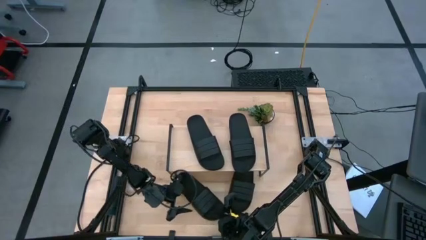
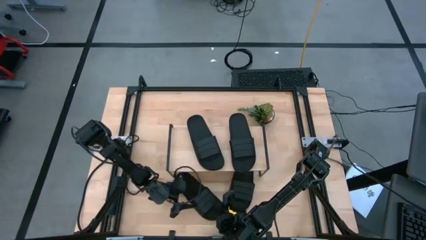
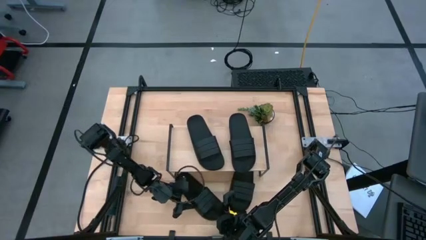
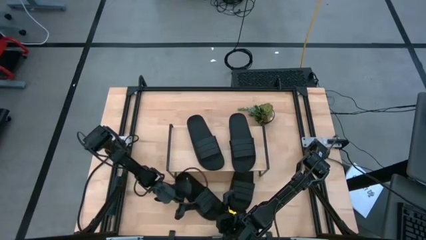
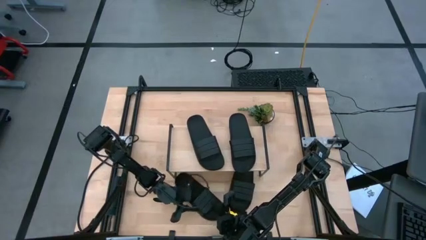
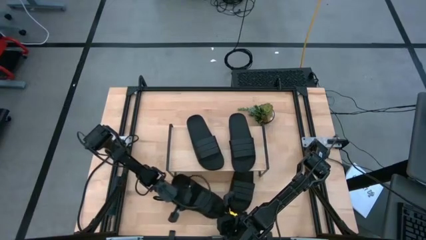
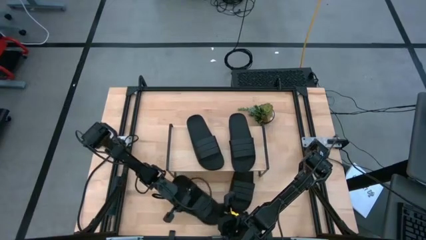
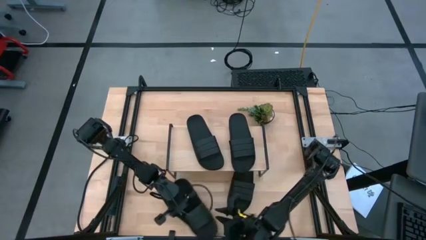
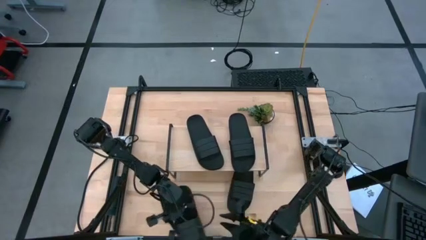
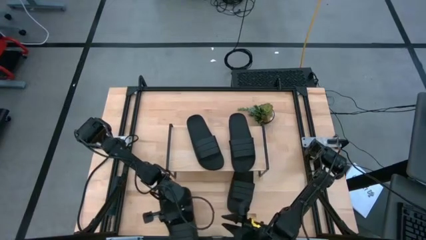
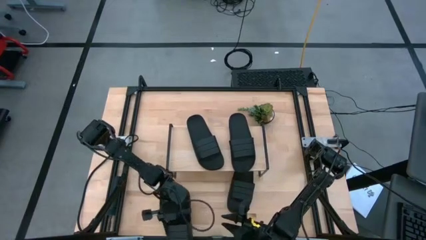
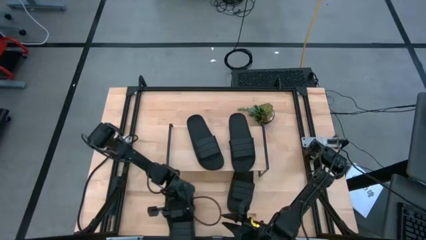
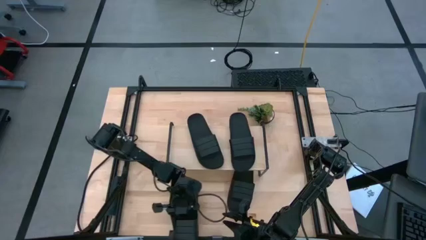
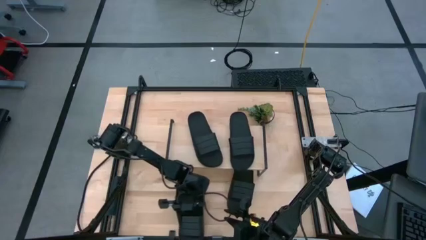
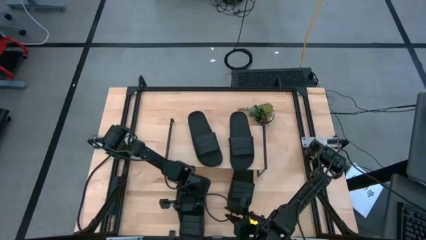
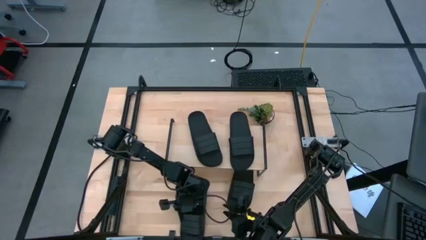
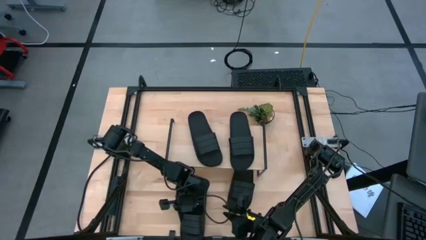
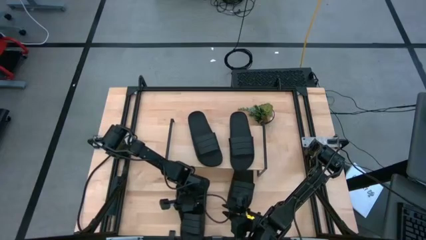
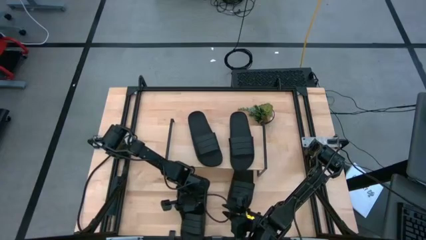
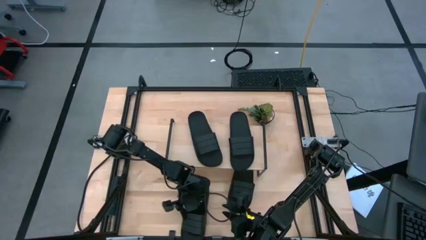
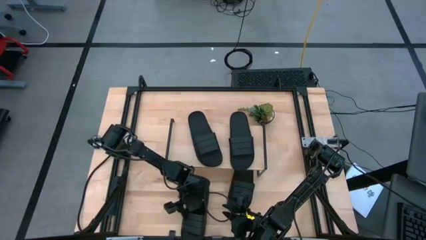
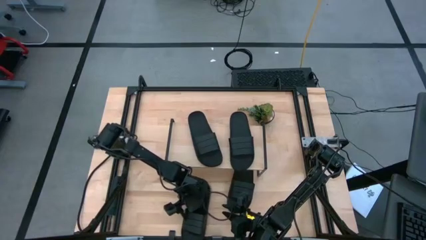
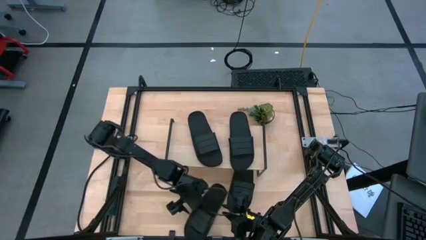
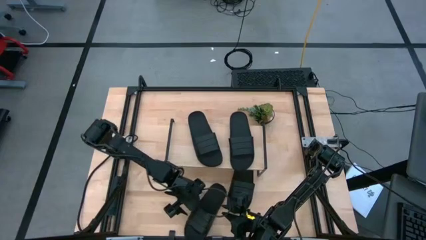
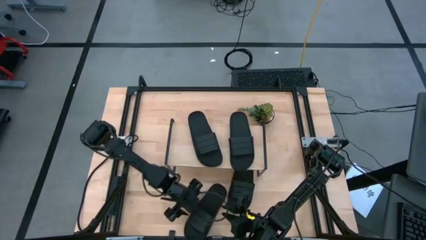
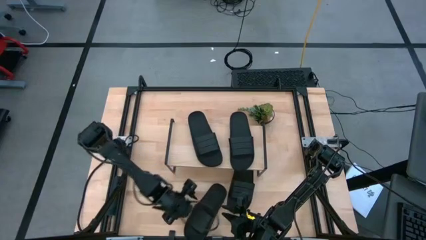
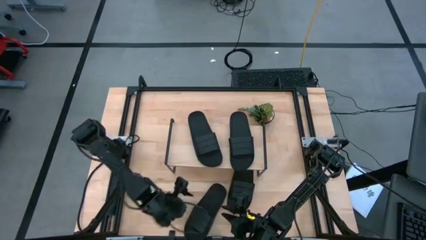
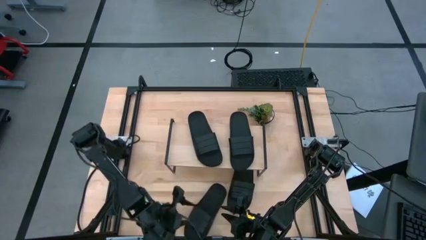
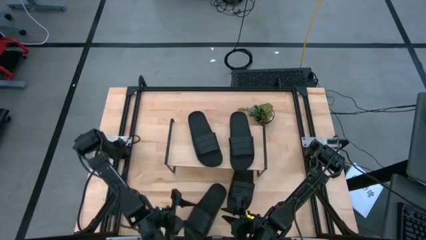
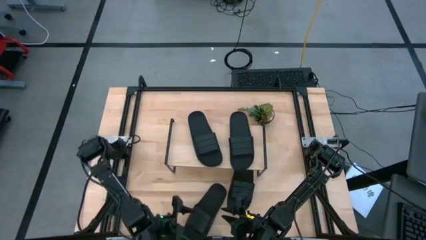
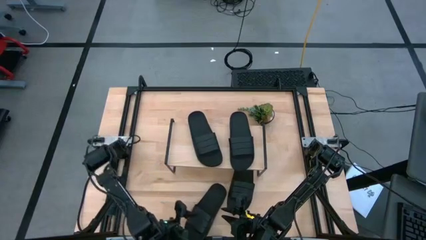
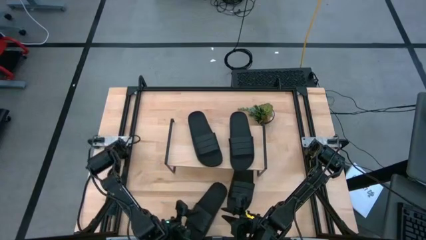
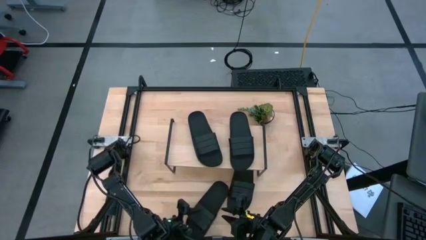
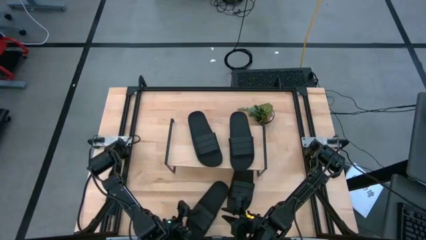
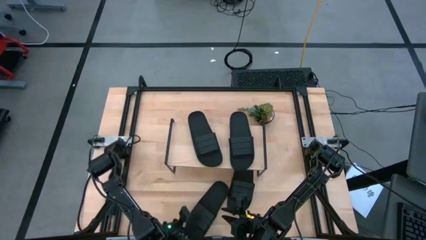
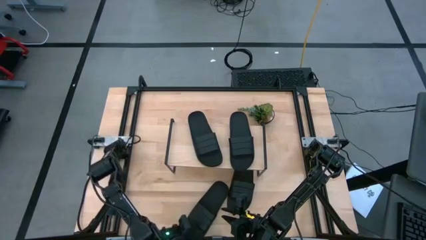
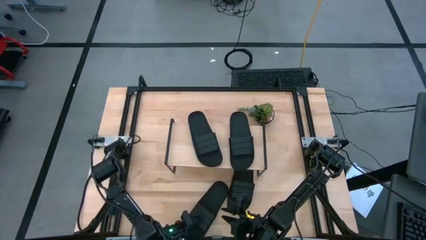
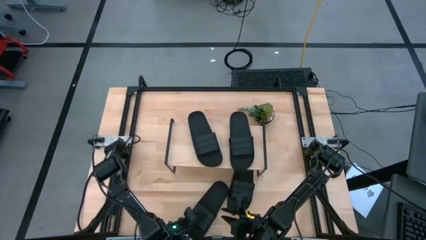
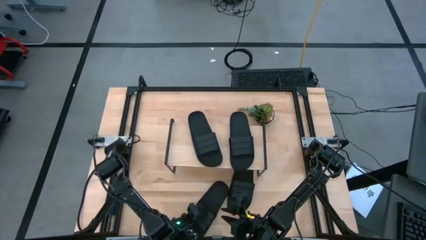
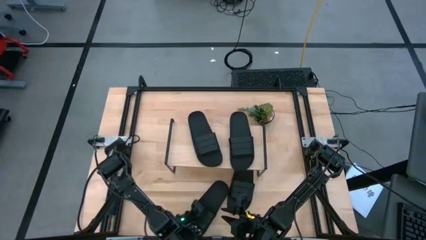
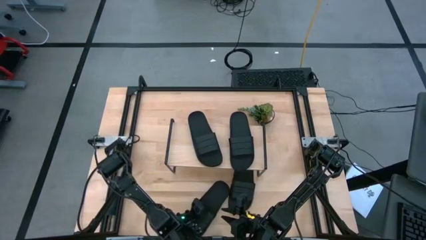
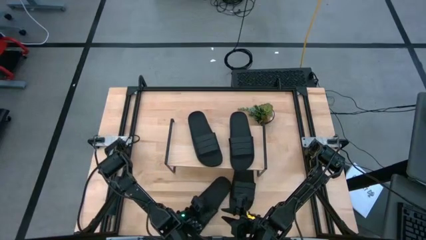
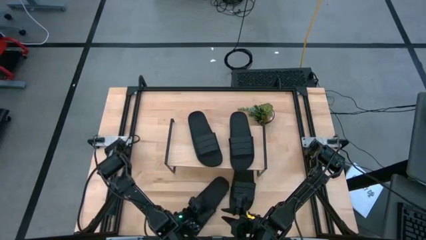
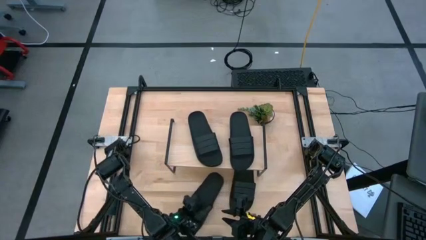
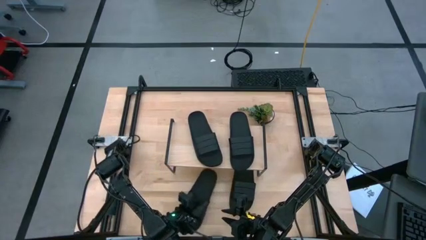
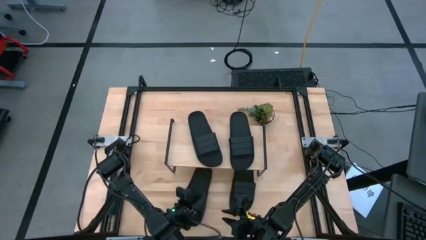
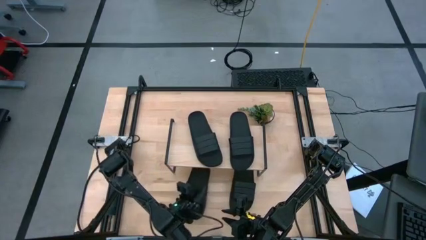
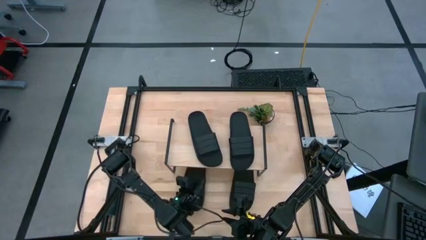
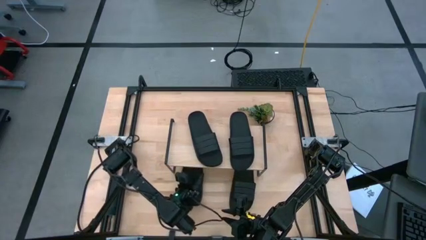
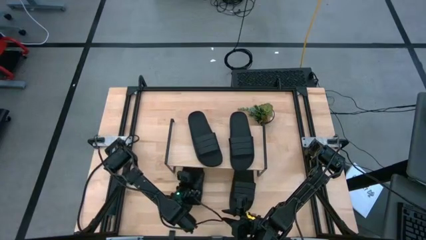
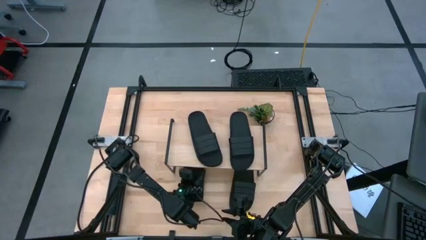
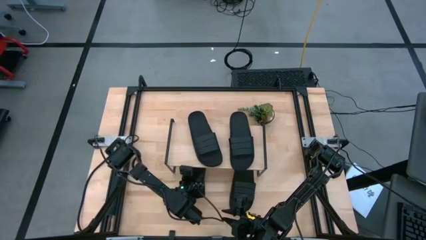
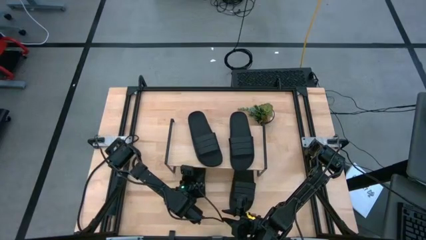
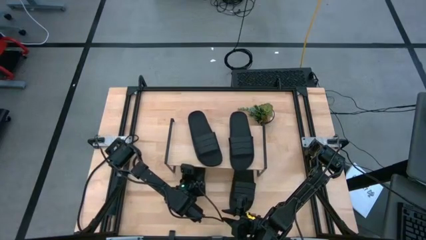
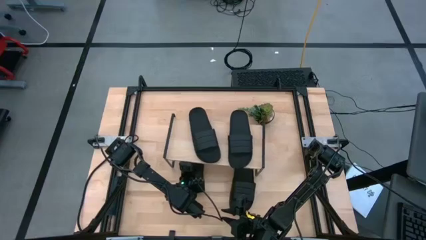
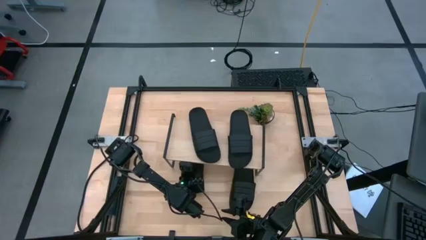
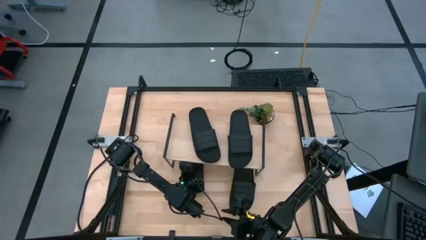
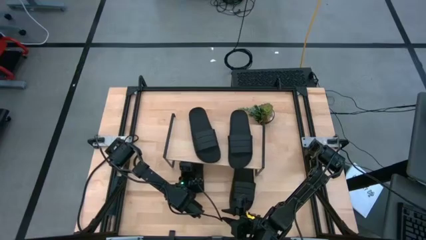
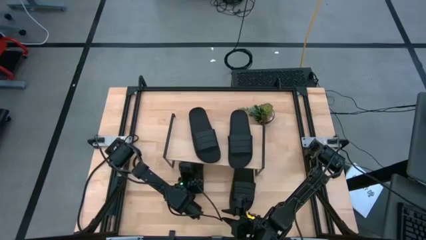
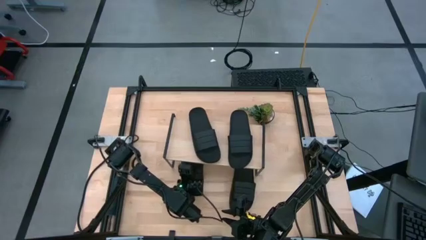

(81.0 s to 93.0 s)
Task: Pick and place slides into the shelf
Adjust the black slide under the shelf

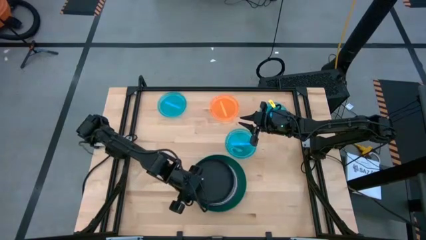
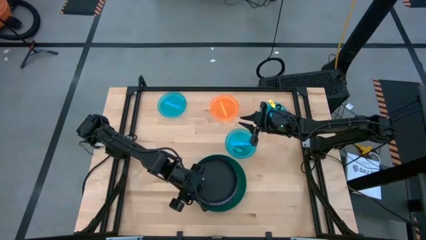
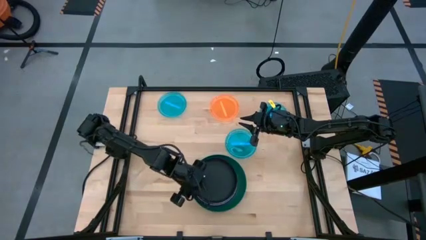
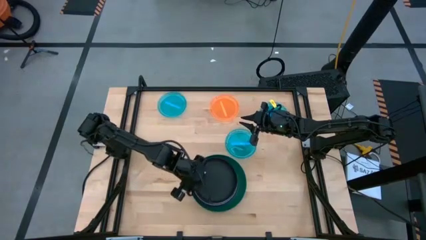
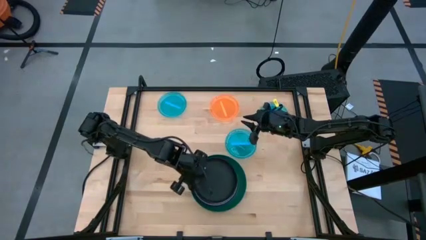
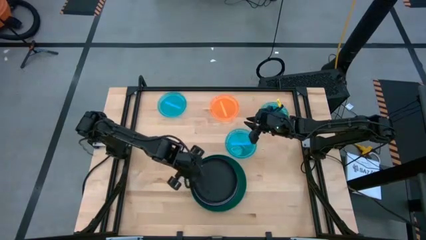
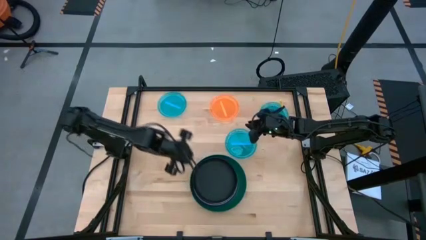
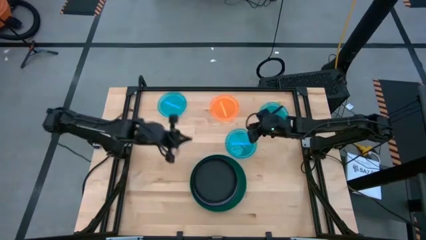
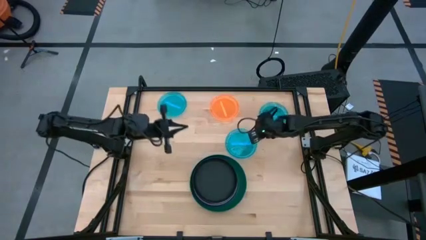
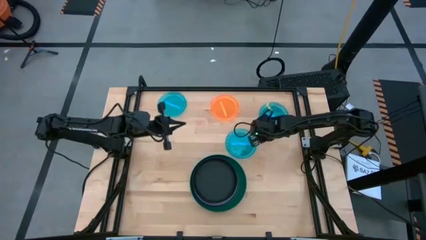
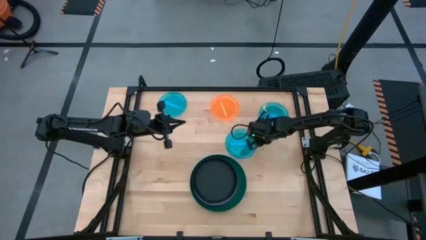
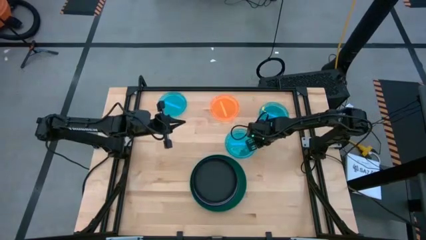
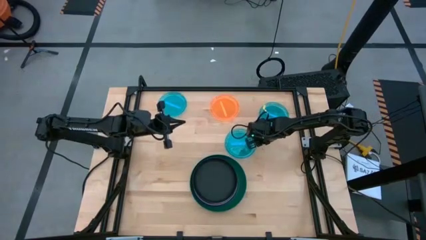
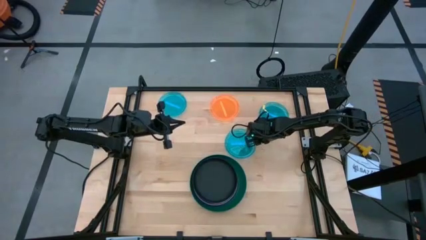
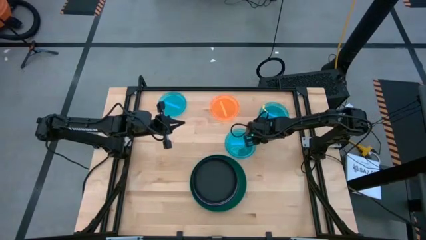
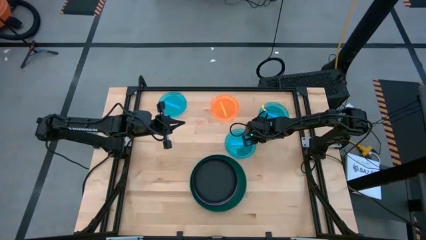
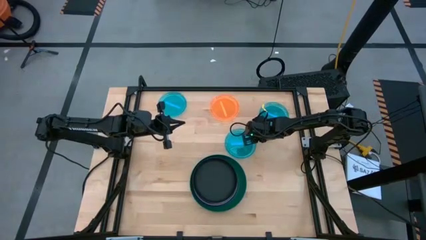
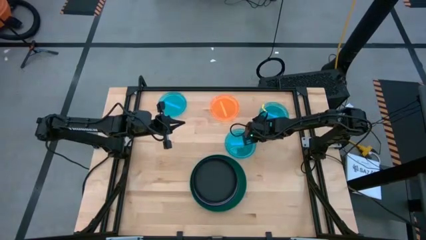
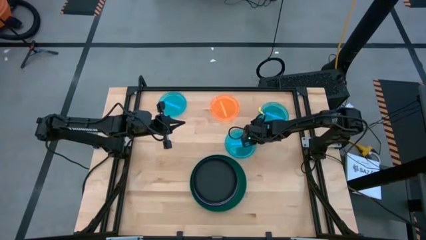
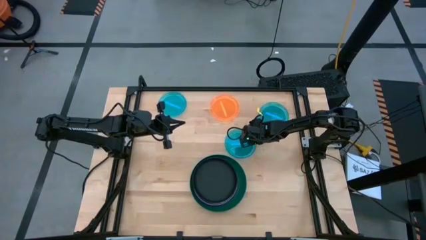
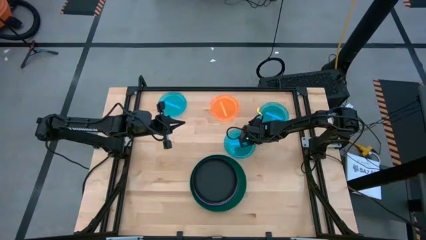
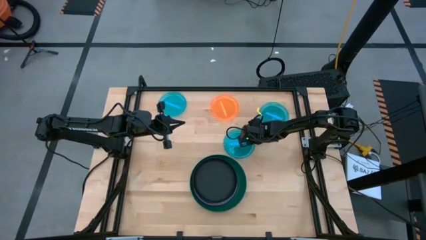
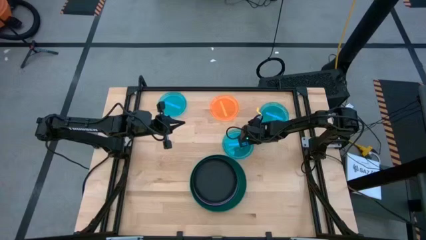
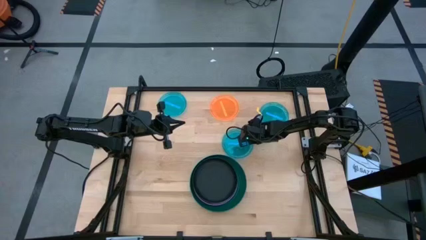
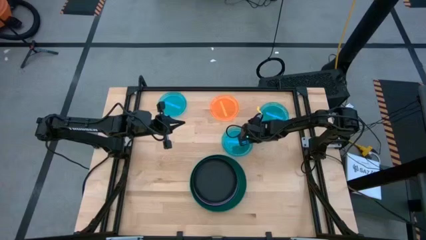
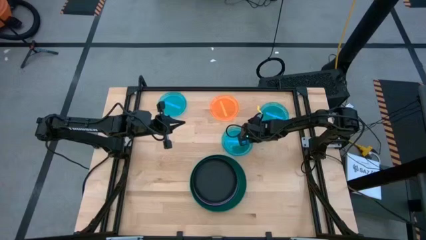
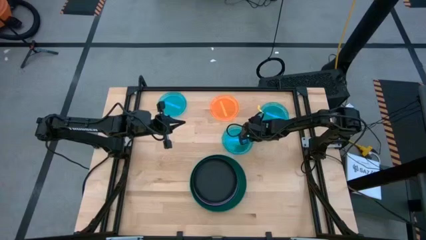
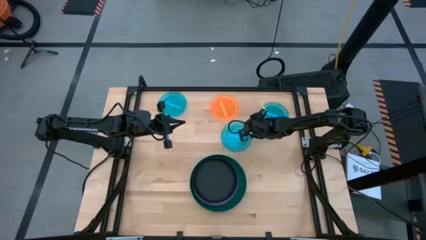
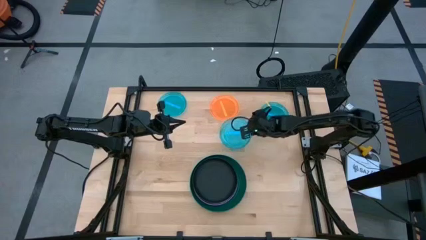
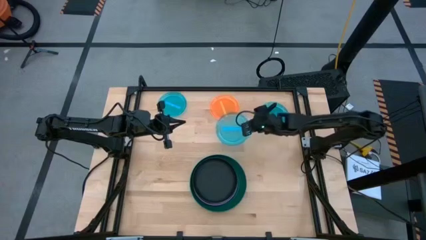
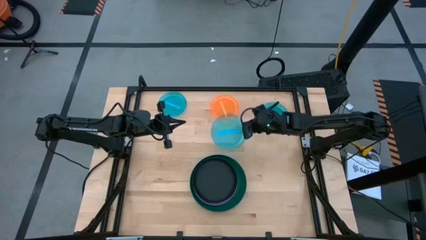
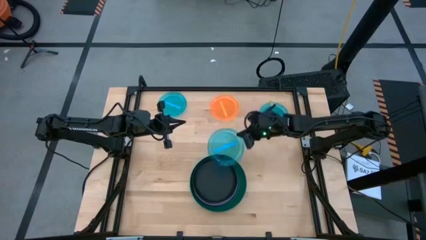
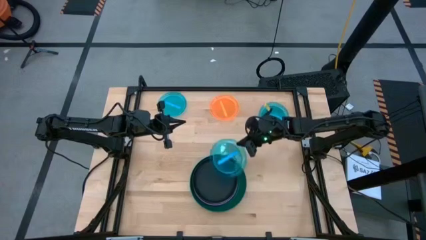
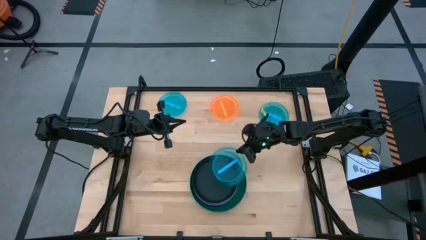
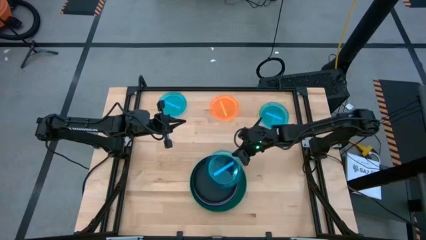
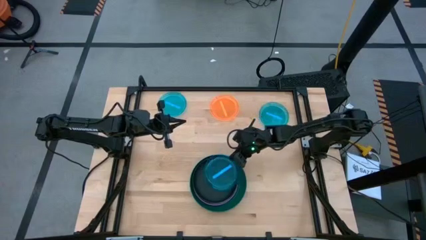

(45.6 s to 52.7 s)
Task: Stack plastic plates
Stack the bottom blue plate on top of the black plate
